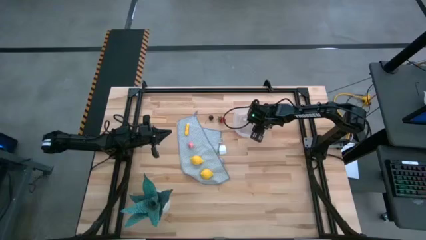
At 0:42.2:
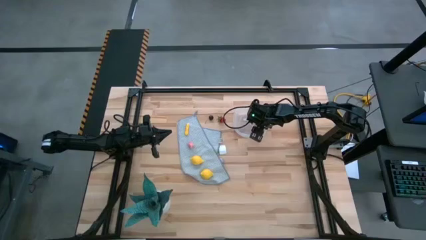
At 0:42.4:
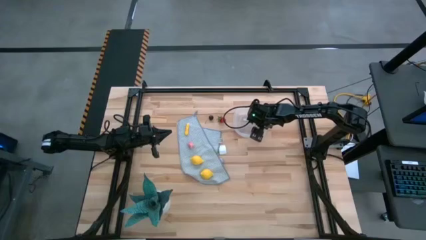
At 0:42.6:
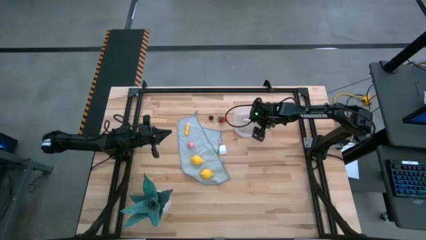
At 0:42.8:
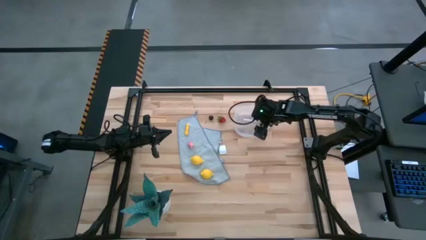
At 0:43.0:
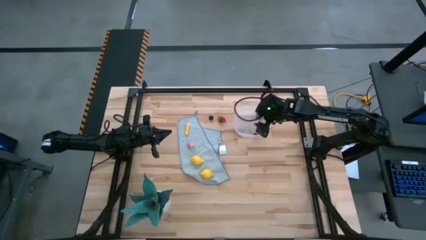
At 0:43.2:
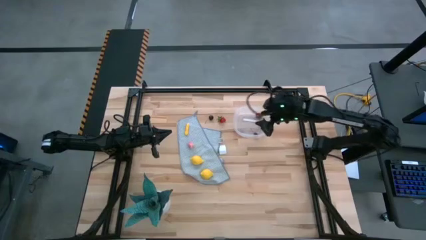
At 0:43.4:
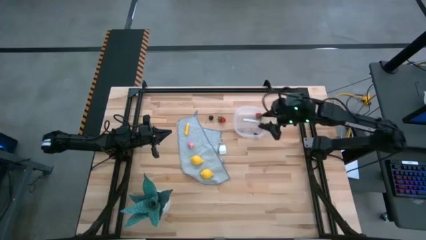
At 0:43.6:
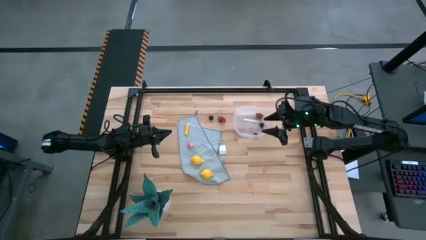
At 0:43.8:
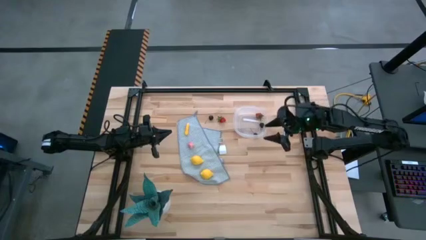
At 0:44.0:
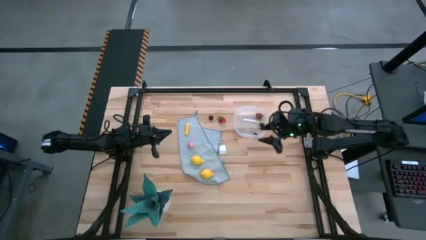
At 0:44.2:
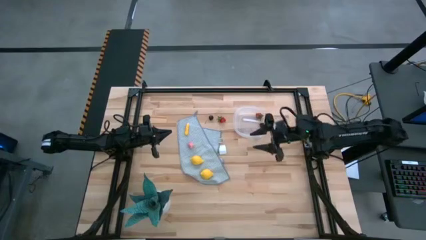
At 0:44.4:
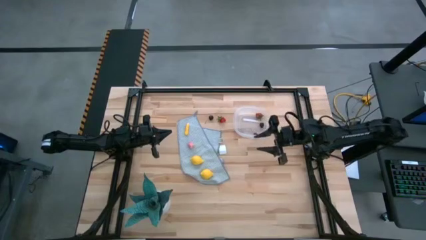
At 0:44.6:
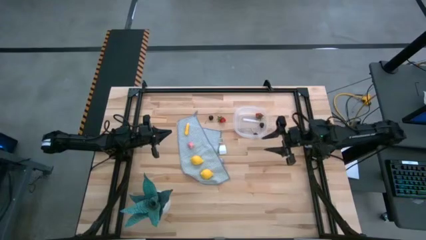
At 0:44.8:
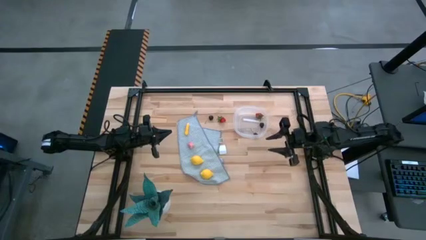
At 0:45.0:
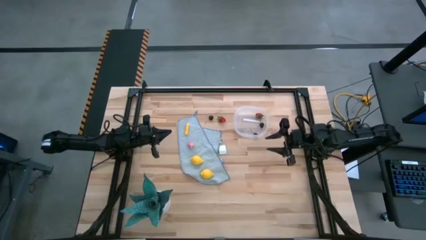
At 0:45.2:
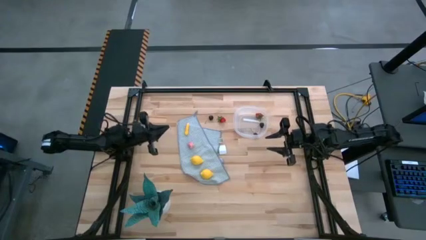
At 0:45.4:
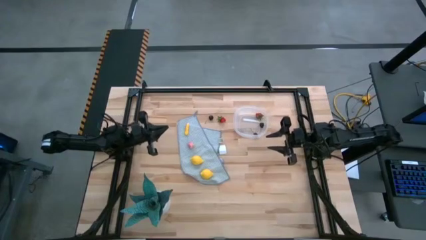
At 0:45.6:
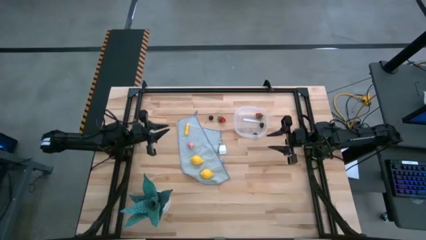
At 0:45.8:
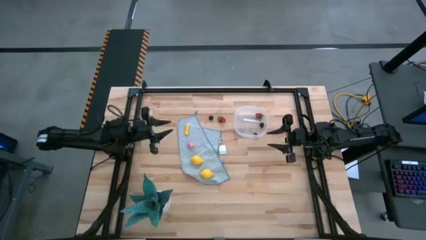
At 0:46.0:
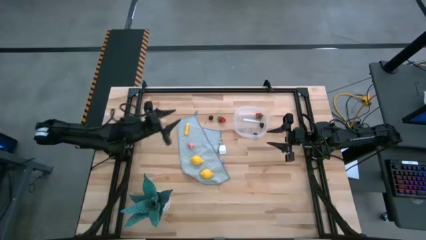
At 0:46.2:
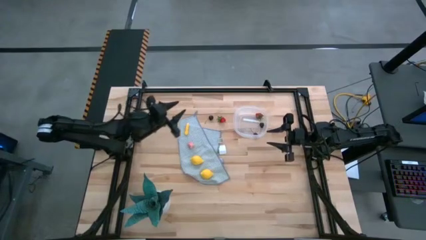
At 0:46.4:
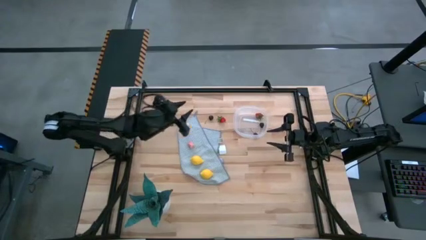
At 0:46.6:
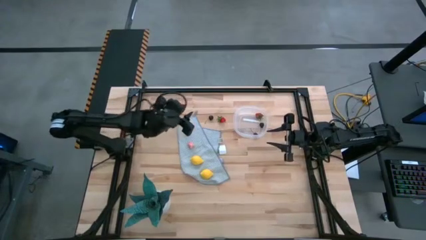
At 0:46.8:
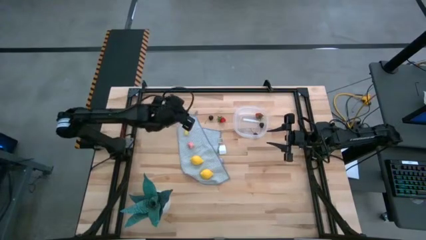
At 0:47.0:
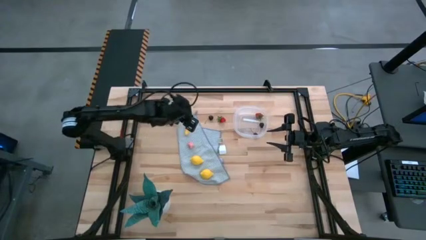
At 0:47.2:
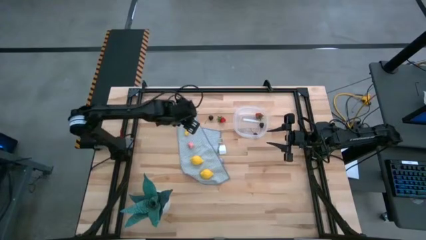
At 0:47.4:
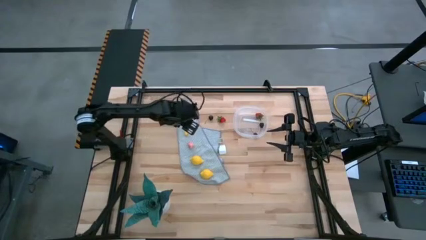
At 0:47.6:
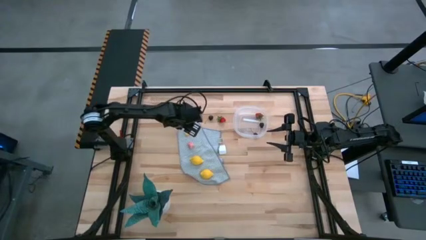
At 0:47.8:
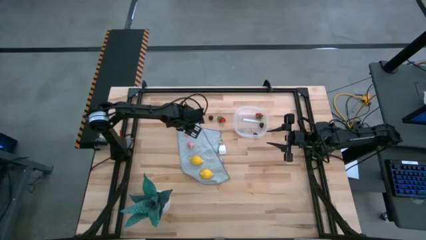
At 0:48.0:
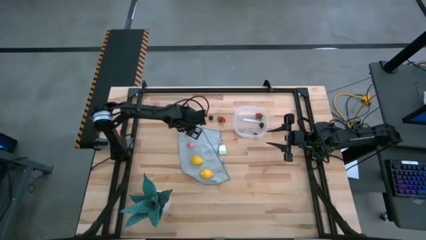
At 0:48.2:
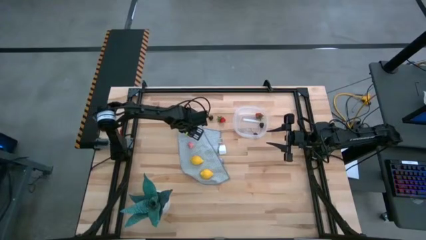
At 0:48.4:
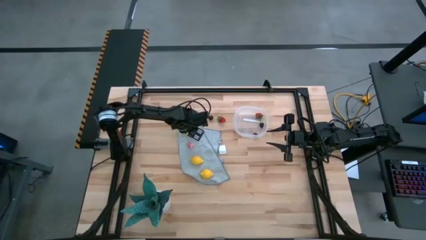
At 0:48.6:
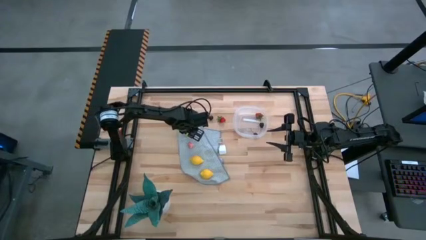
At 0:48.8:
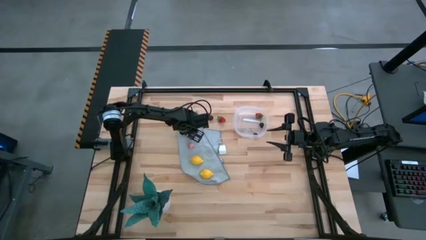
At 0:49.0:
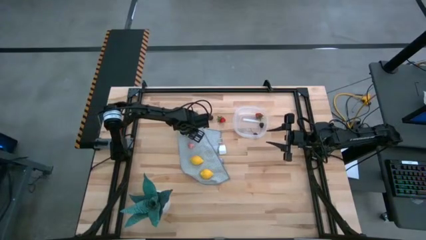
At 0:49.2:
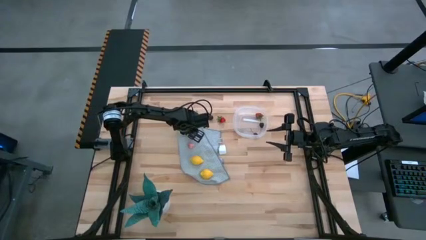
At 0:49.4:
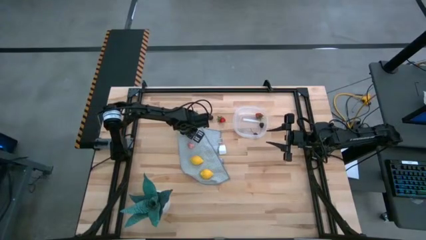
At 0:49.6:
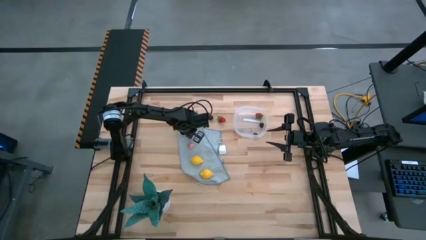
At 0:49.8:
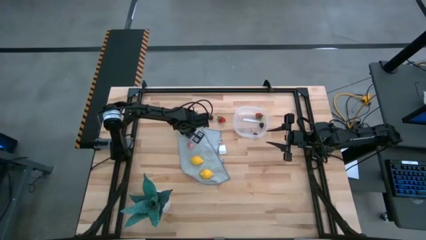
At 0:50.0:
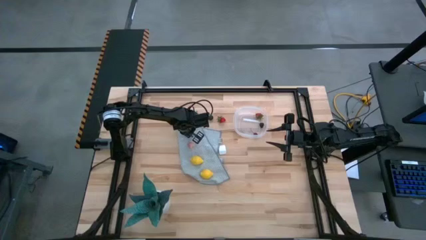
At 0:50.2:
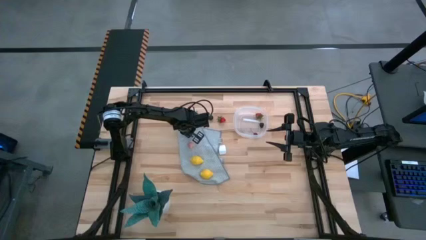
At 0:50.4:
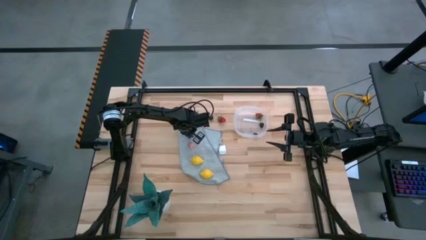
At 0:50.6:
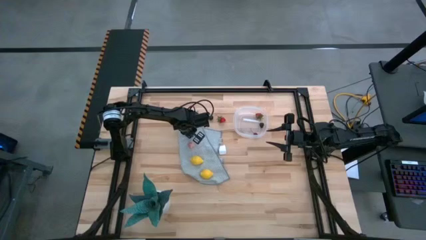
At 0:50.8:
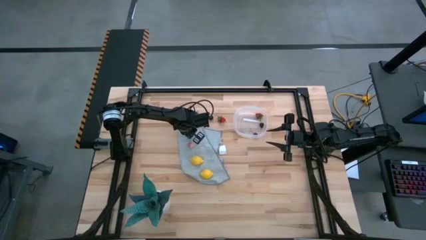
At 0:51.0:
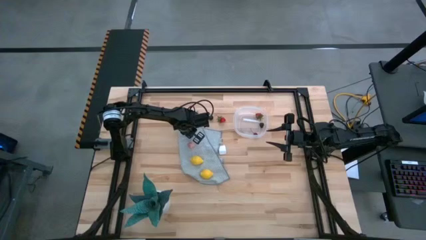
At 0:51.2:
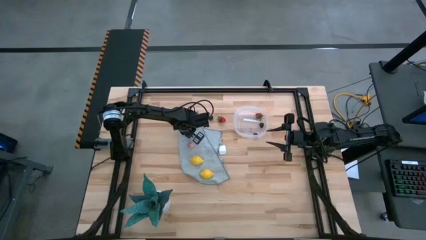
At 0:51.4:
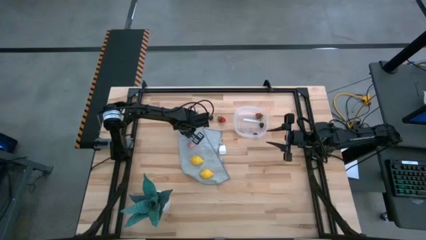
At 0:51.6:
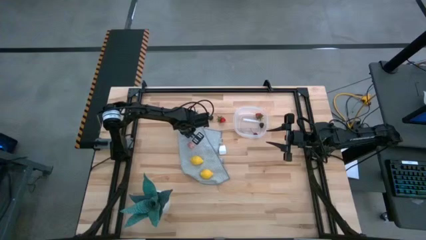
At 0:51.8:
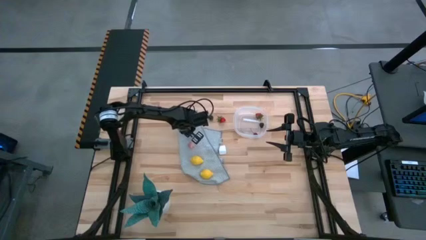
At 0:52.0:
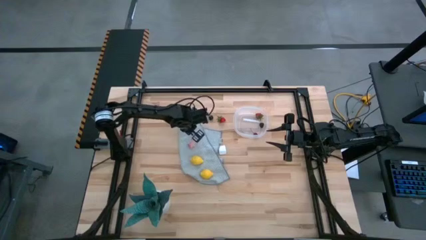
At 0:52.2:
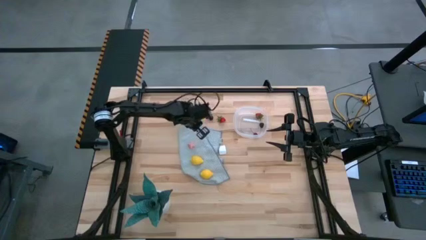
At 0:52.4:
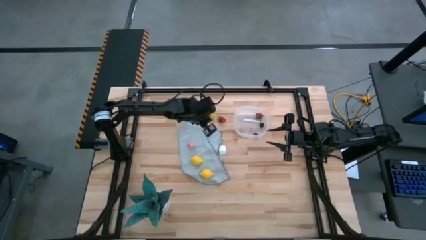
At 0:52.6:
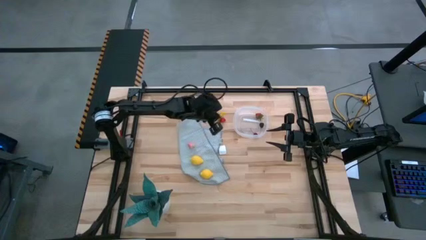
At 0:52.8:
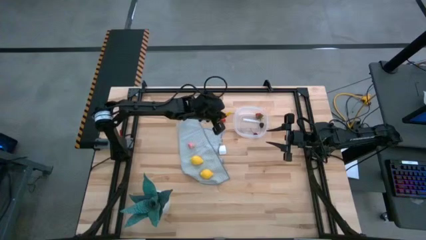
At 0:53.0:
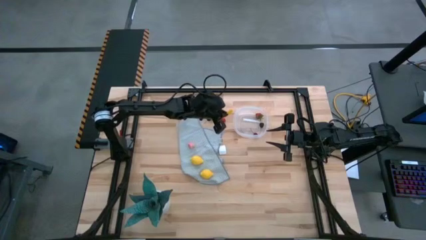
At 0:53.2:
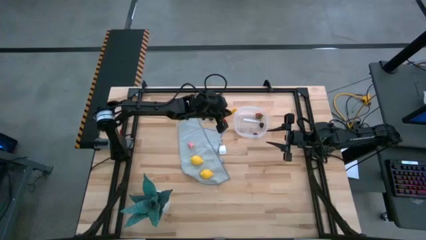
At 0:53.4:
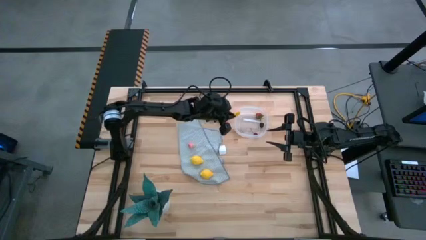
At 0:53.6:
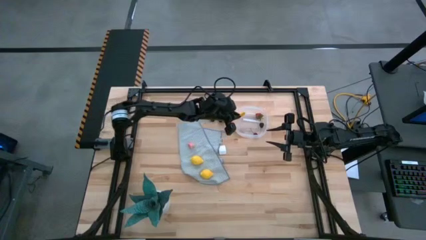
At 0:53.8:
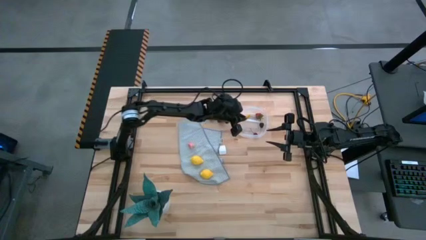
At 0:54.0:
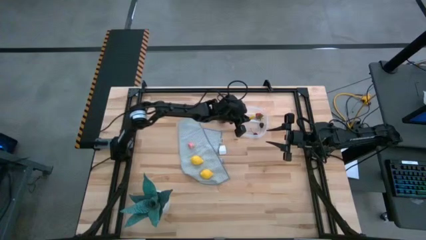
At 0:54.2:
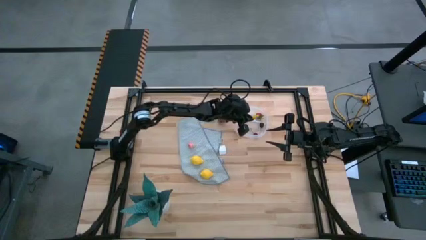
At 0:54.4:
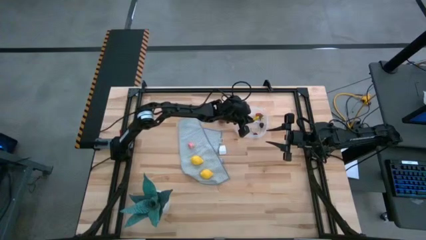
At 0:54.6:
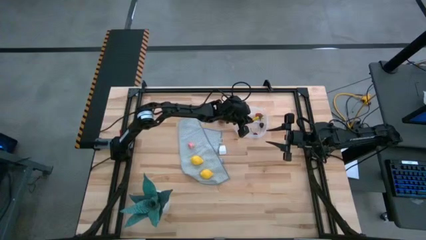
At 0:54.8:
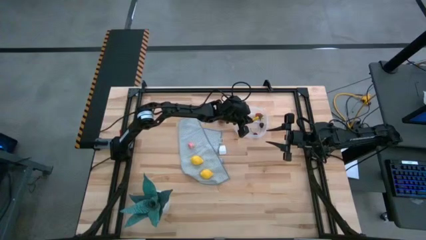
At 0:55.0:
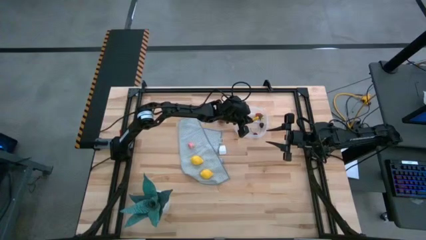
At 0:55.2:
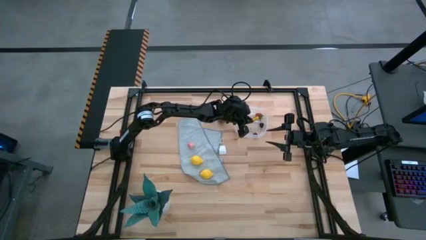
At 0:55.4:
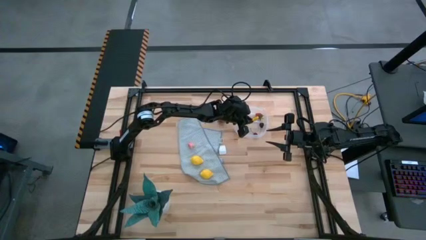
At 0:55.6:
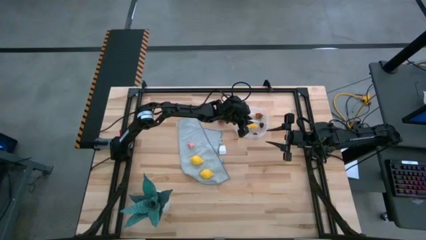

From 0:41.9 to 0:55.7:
Task: Pick and placing Produce into tupperware
Put the yellow yellow zucchini into the transparent bin
